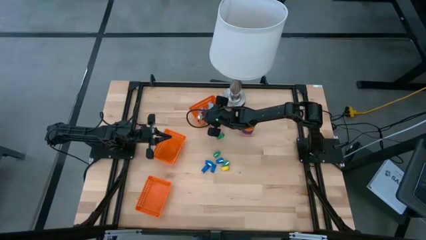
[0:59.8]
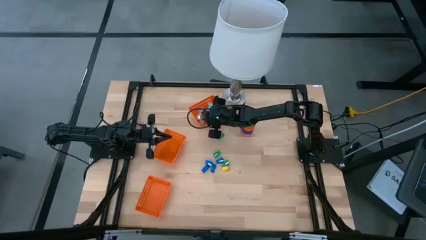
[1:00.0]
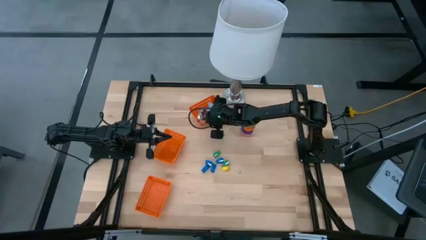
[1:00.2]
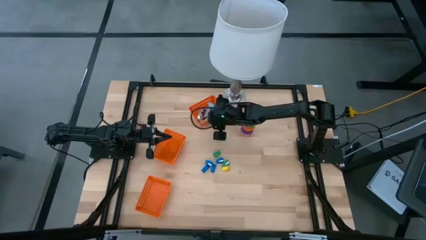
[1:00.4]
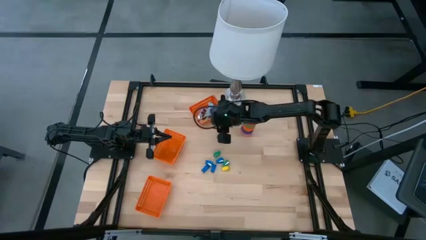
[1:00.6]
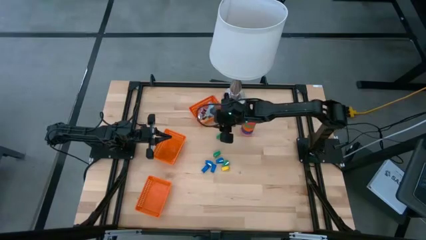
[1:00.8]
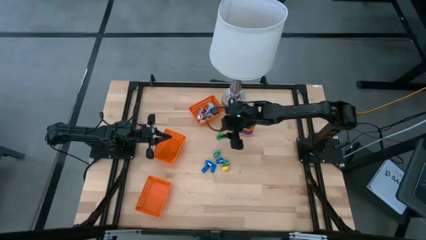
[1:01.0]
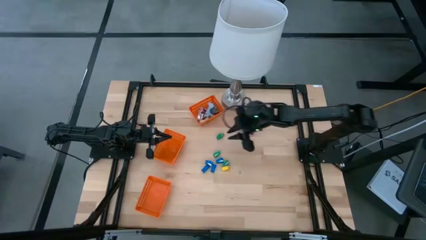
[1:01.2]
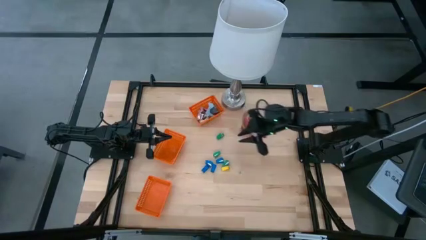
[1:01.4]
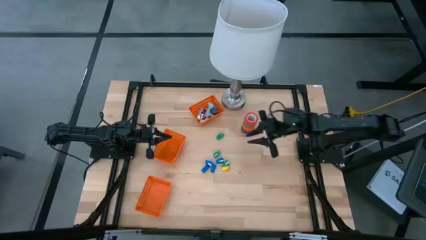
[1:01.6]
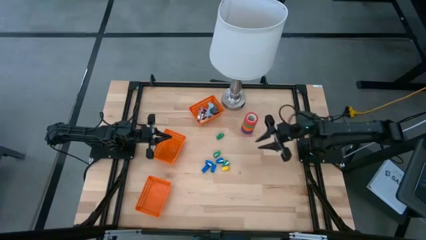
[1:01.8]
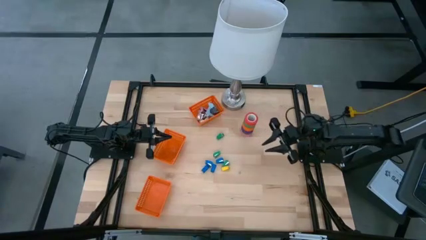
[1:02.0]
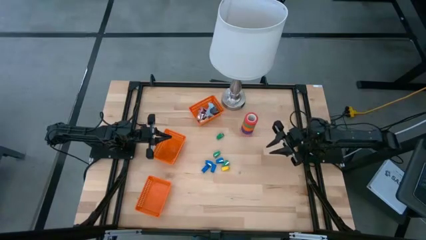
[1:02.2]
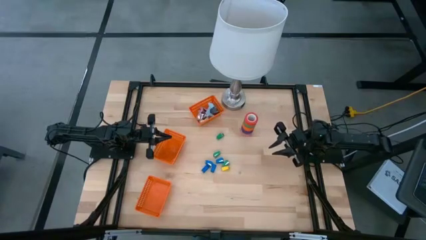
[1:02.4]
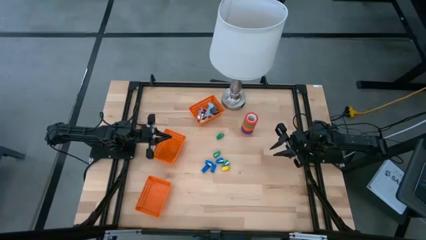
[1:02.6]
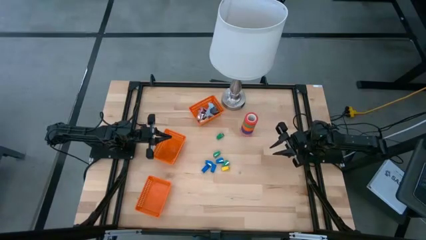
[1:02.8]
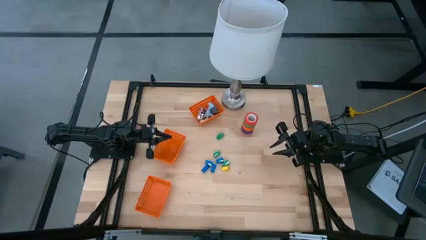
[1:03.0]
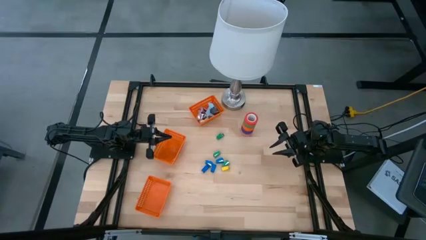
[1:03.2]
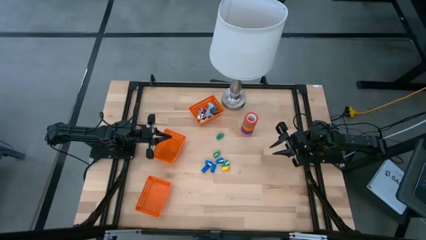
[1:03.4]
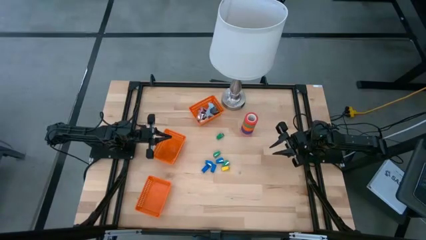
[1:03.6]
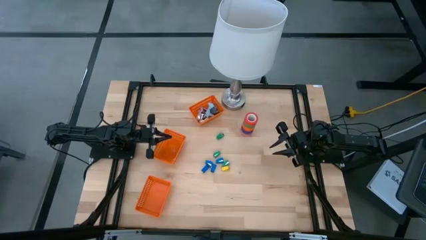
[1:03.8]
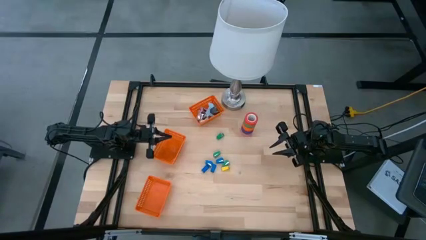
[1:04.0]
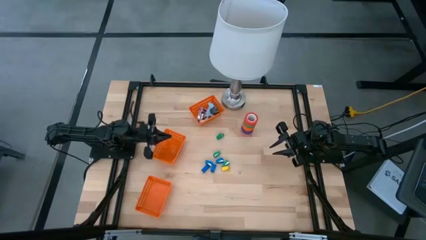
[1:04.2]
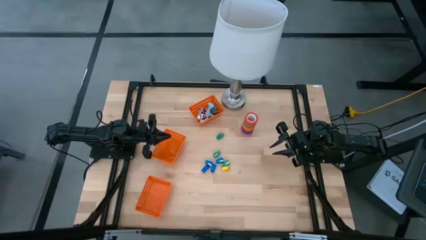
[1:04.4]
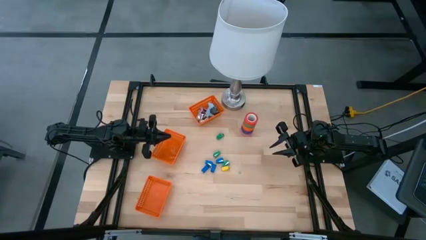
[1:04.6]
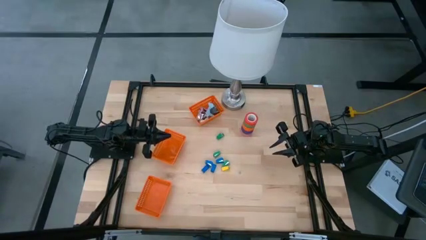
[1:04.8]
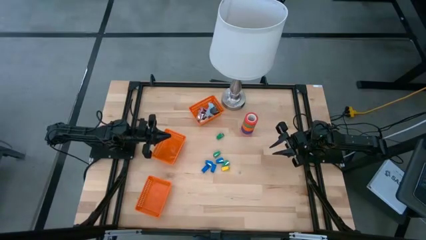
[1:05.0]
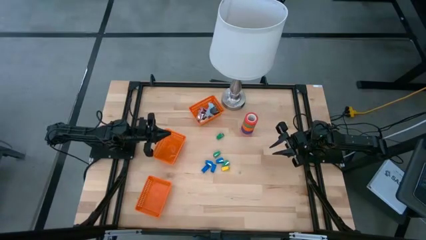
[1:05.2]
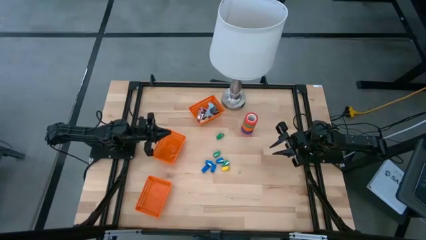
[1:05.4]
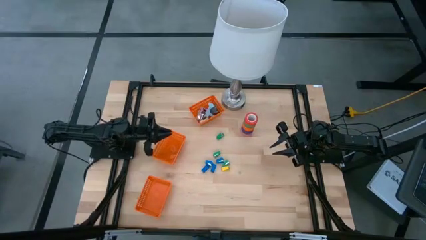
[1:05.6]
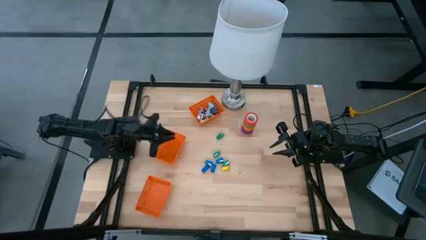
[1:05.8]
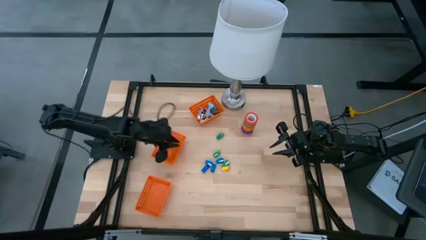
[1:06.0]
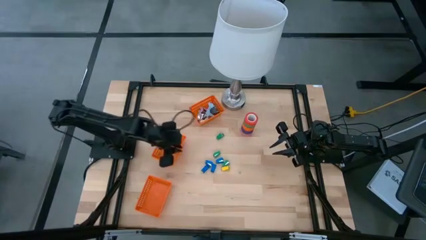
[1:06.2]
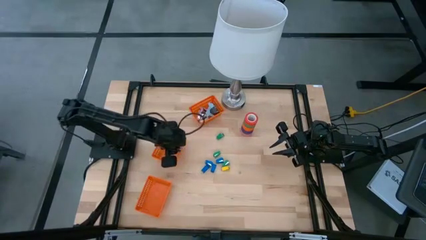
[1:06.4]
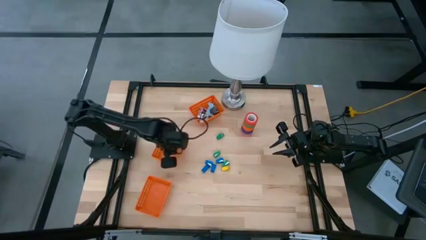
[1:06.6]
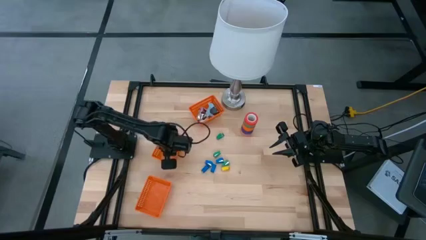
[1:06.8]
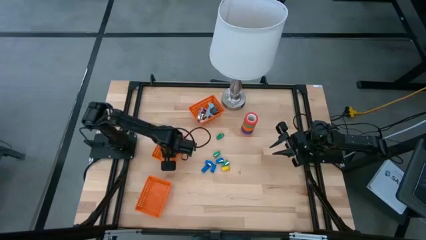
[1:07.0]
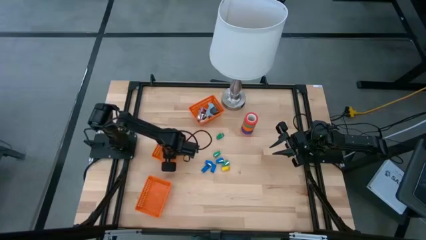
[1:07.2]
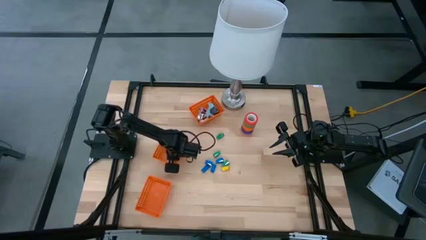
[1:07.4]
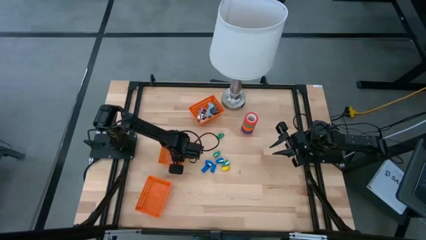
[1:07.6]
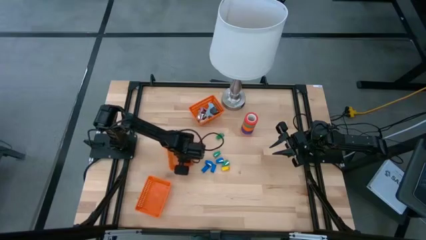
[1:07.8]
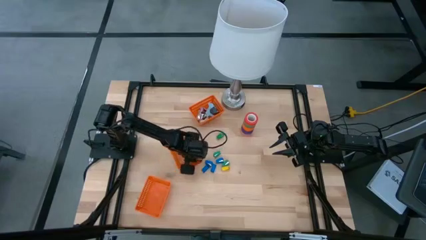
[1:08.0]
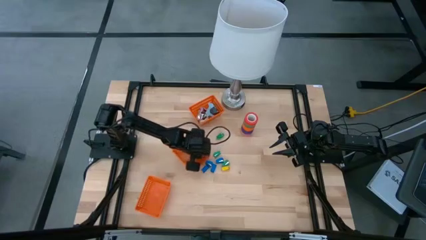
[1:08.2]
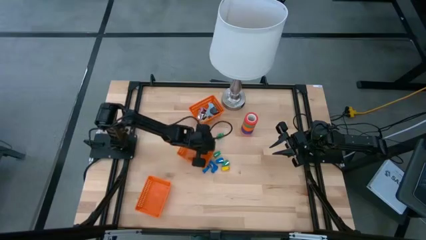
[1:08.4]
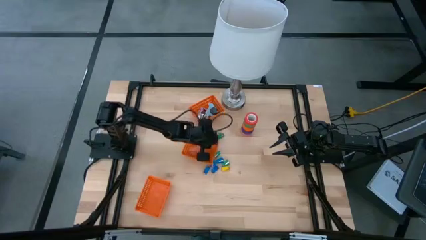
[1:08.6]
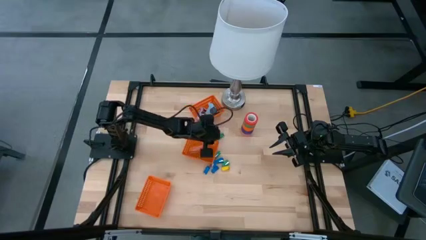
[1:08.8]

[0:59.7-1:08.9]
Task: Pick and place Stapler, Stapler remover, tape
Adjust the middle orange bin

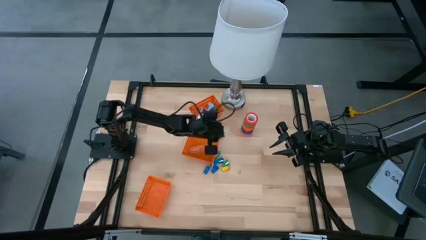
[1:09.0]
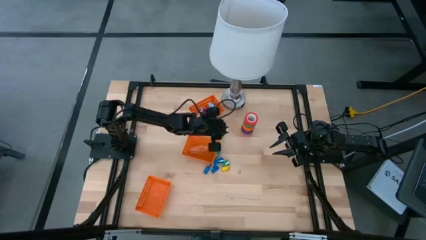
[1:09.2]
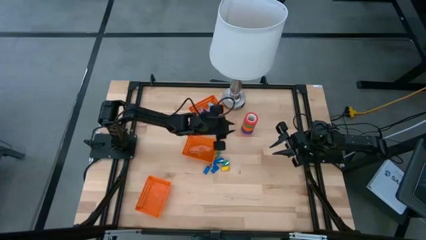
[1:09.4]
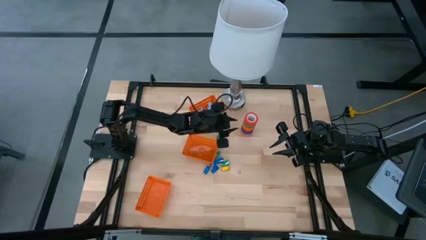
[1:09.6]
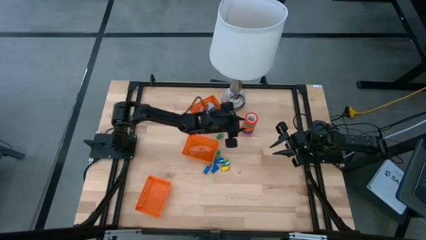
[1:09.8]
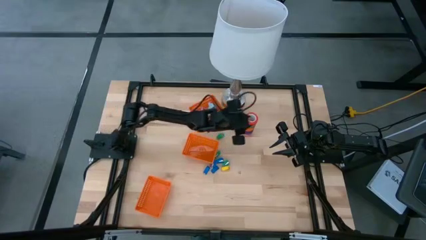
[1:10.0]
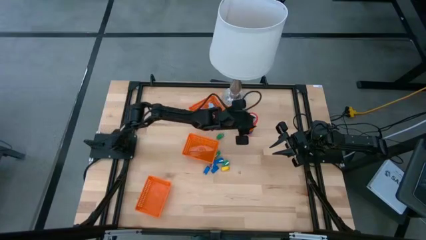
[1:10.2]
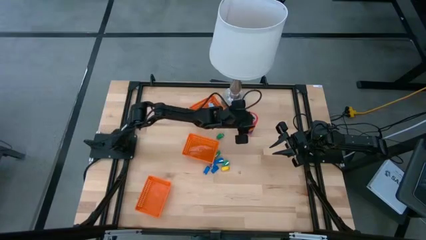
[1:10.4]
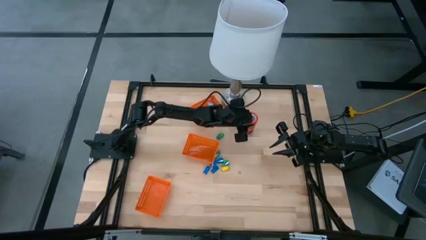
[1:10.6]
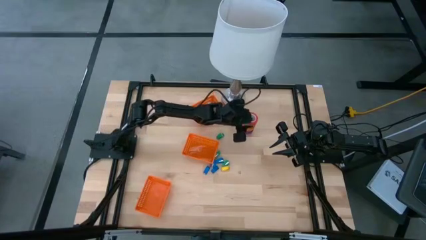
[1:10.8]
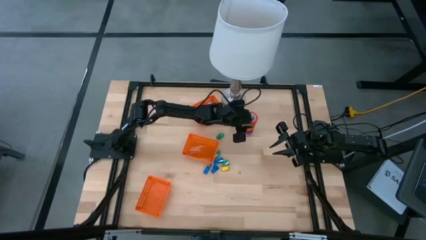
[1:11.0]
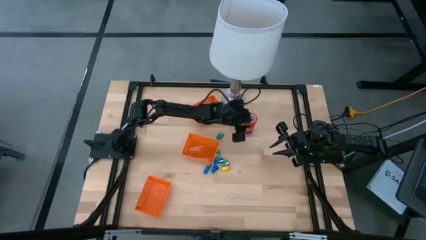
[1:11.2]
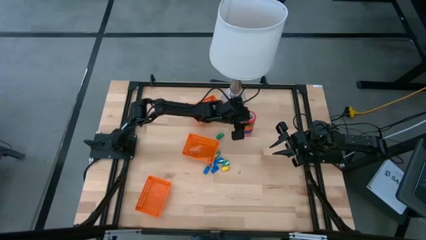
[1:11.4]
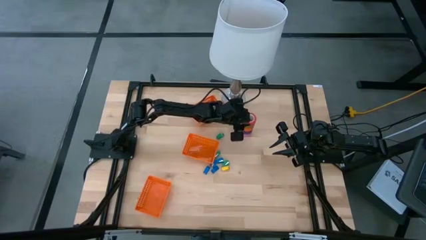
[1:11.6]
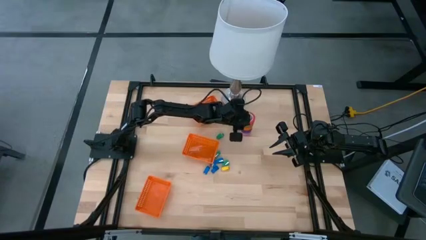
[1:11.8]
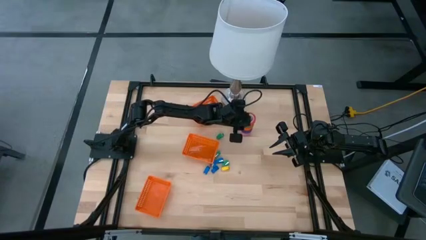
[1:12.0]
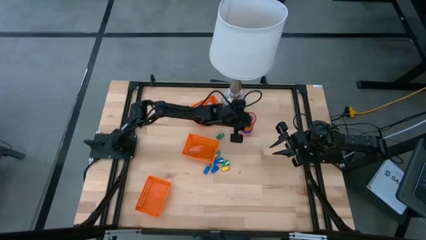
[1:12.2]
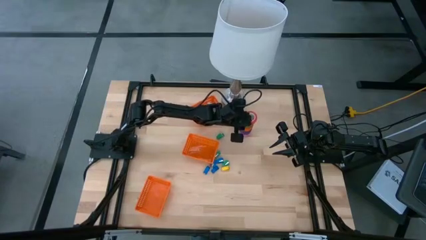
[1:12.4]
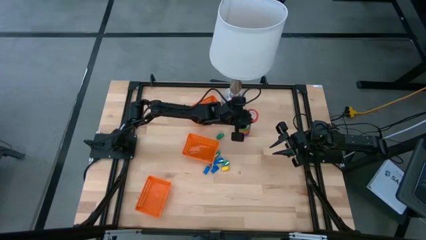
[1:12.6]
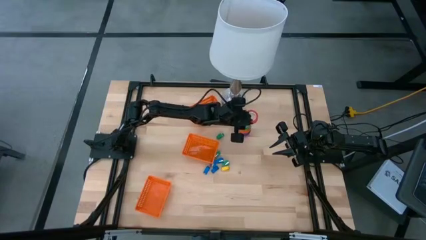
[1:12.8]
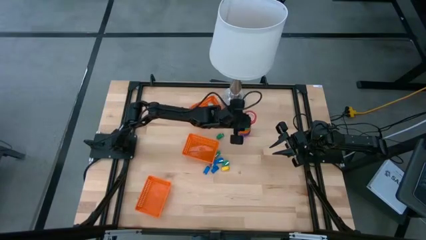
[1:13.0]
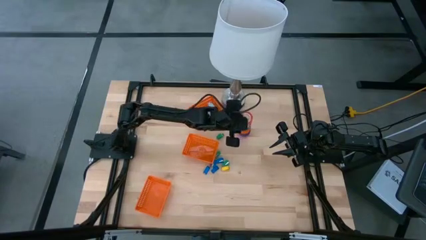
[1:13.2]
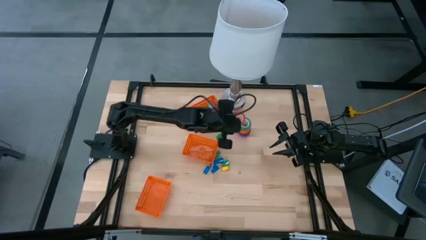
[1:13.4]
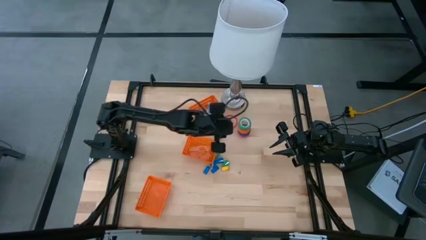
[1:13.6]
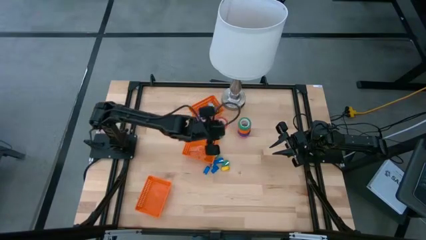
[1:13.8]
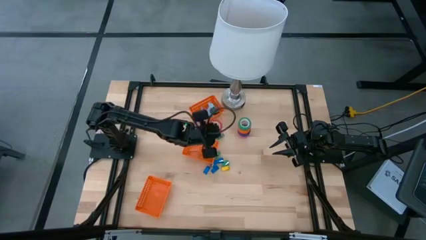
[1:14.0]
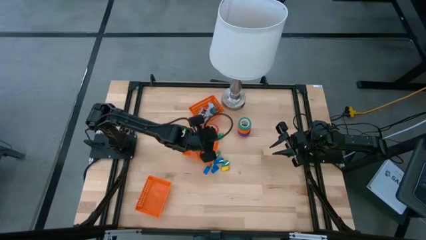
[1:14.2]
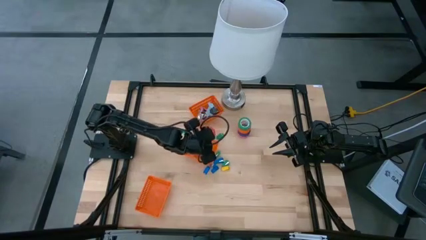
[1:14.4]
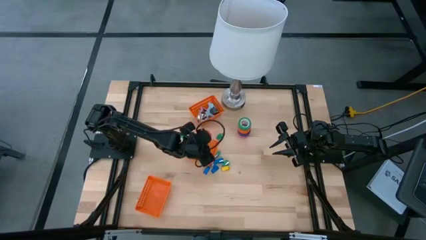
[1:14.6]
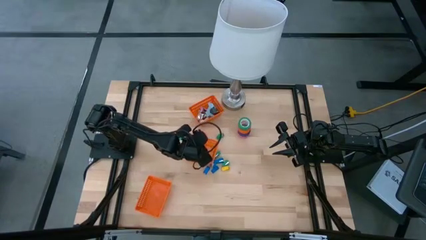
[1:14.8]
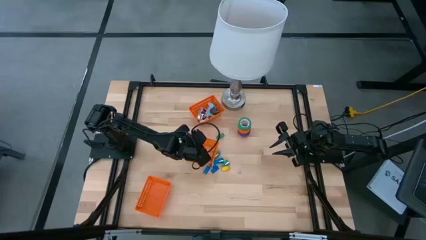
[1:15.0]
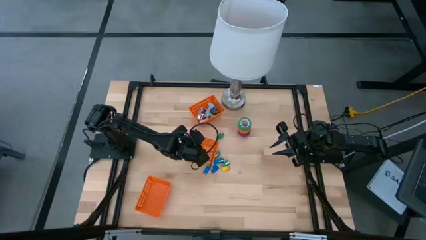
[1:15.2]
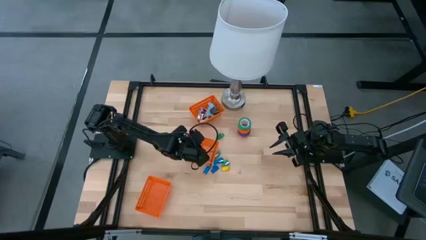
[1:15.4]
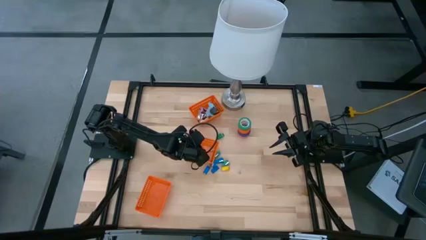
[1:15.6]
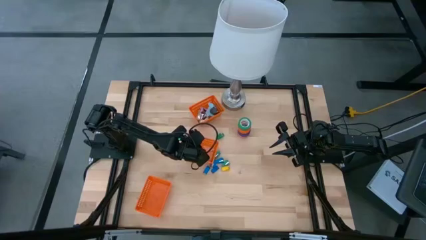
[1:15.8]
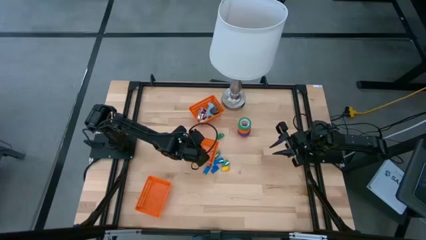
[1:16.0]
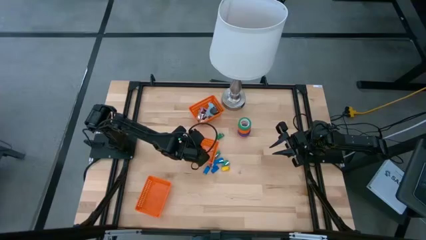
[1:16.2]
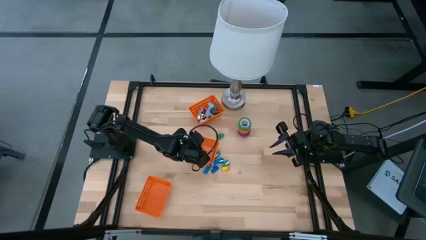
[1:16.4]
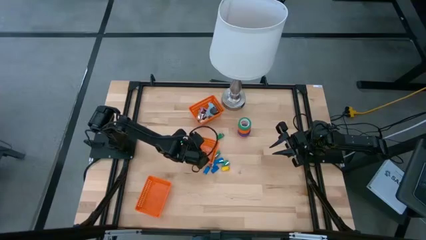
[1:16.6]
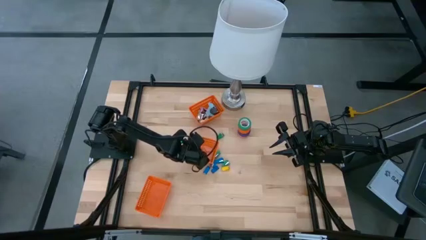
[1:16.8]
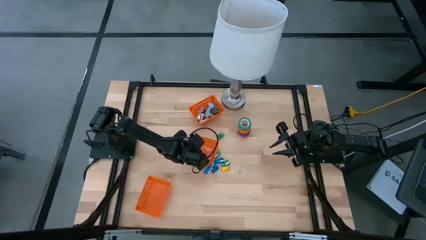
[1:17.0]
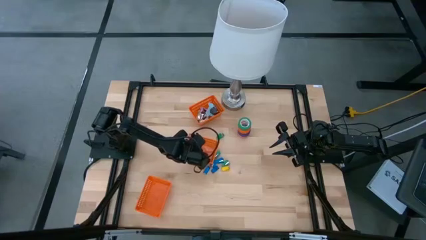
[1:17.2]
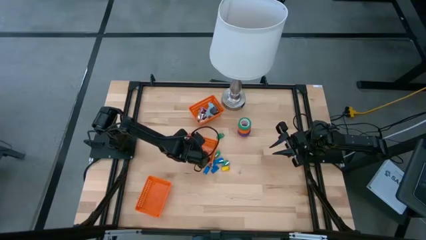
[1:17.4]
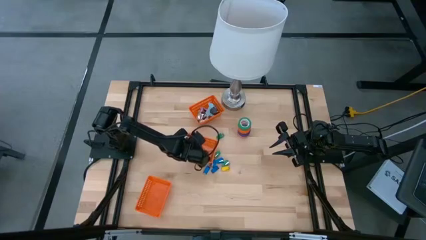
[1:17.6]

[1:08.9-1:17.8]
Put the red tape into the middle orange bin
